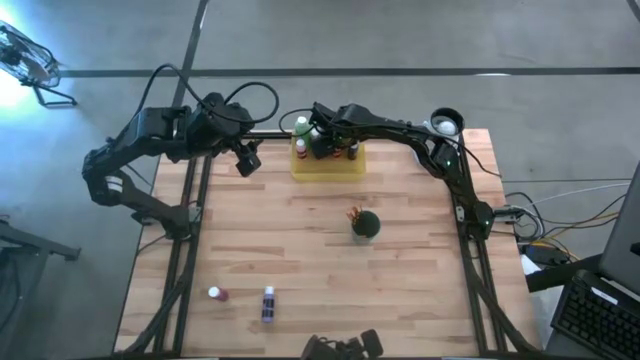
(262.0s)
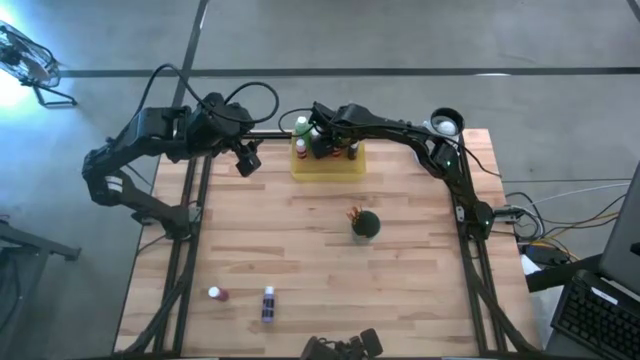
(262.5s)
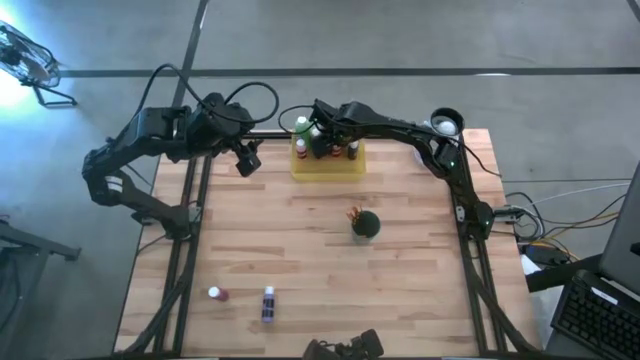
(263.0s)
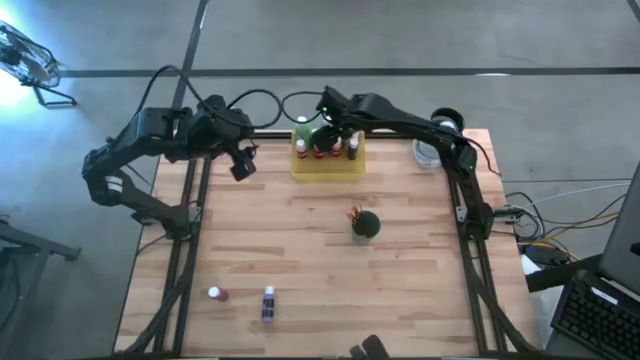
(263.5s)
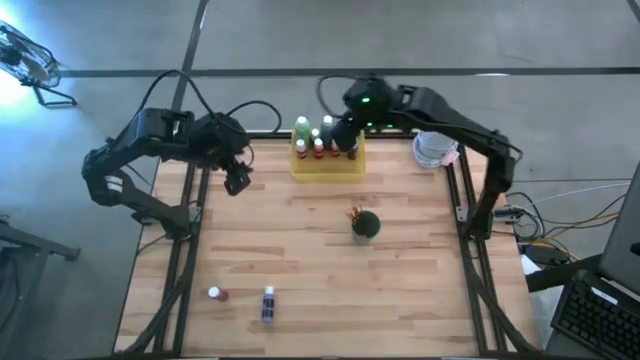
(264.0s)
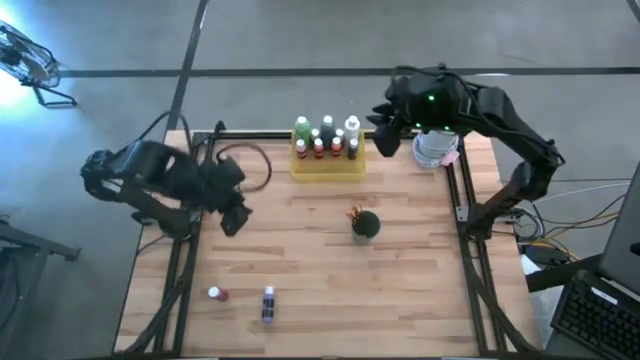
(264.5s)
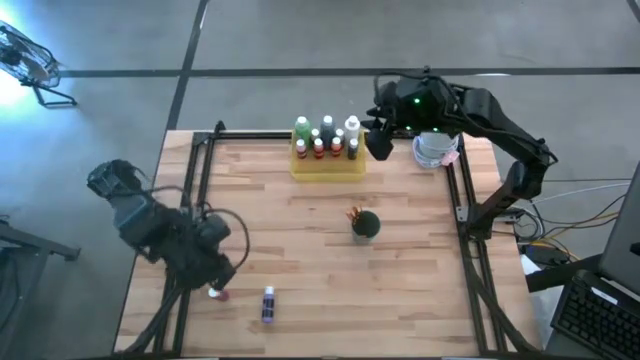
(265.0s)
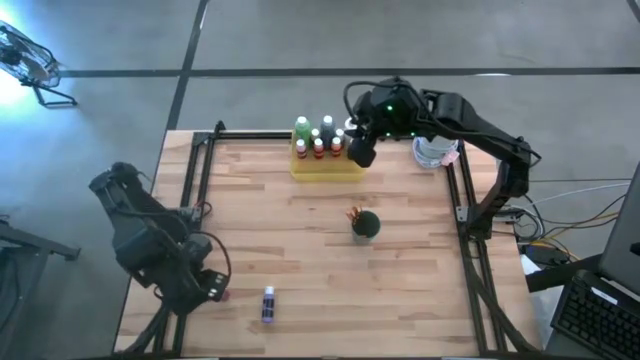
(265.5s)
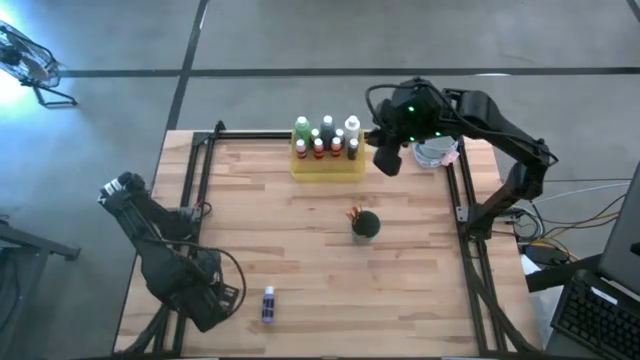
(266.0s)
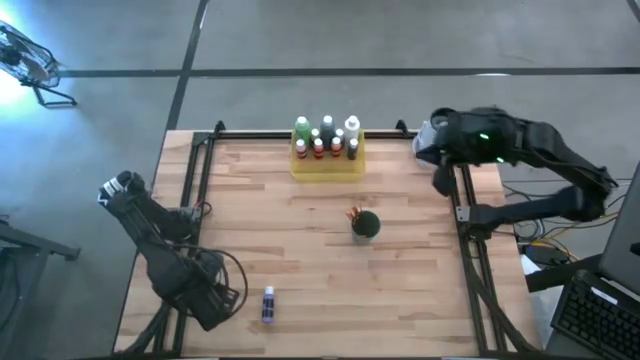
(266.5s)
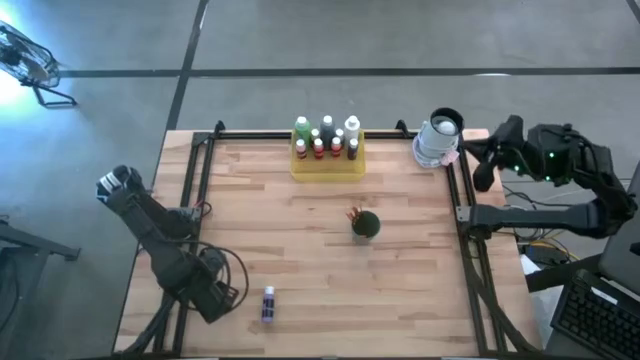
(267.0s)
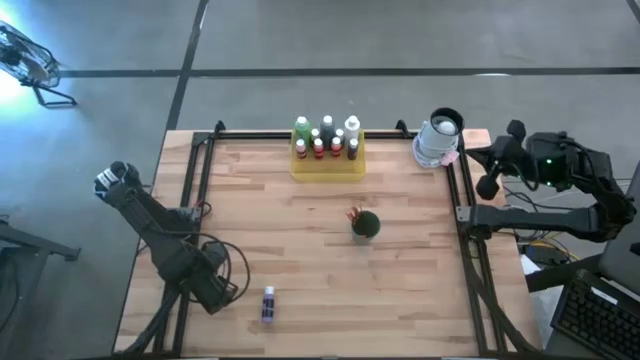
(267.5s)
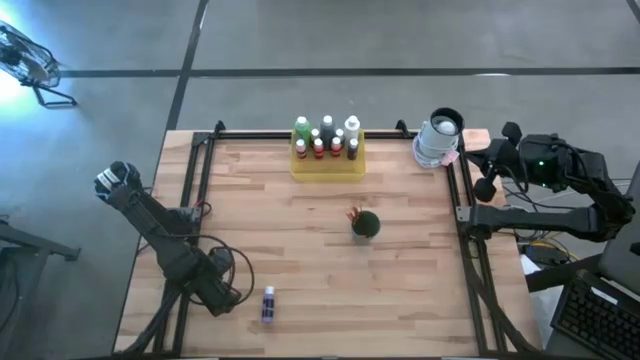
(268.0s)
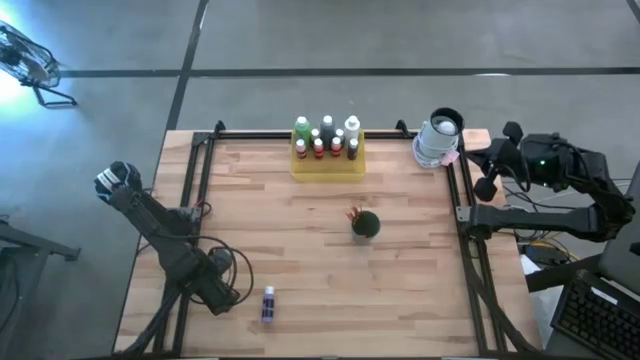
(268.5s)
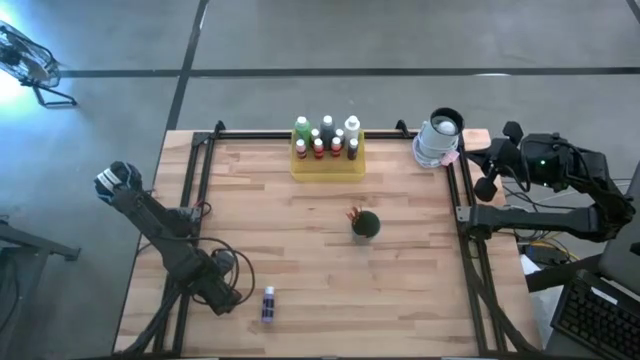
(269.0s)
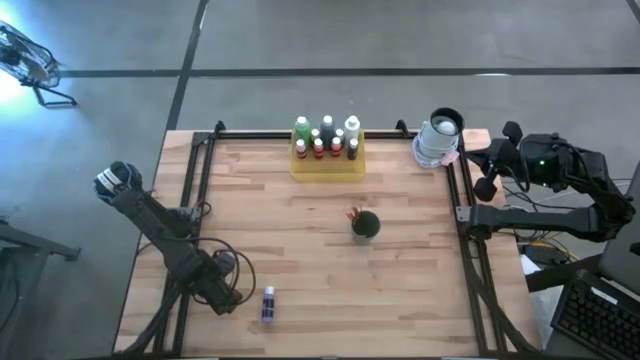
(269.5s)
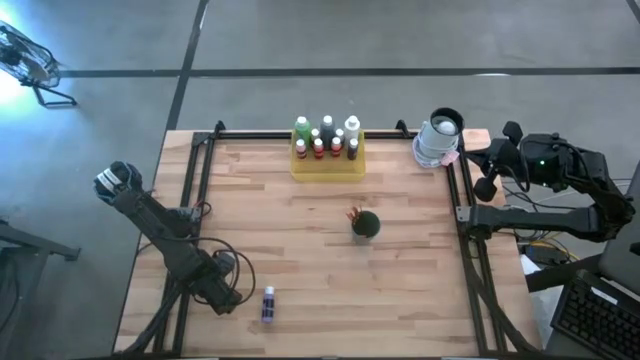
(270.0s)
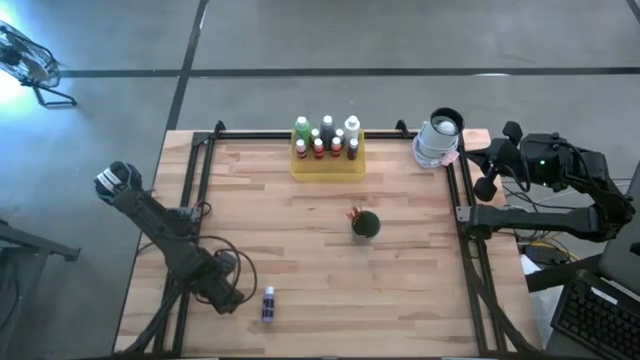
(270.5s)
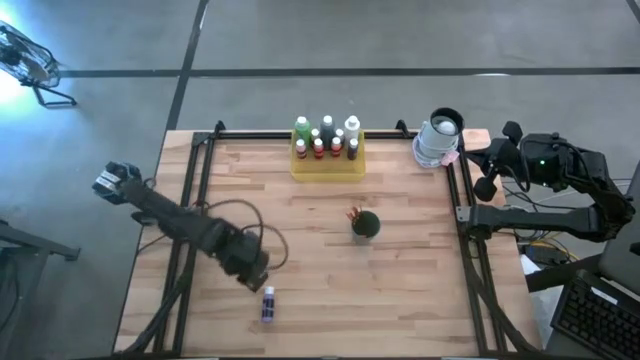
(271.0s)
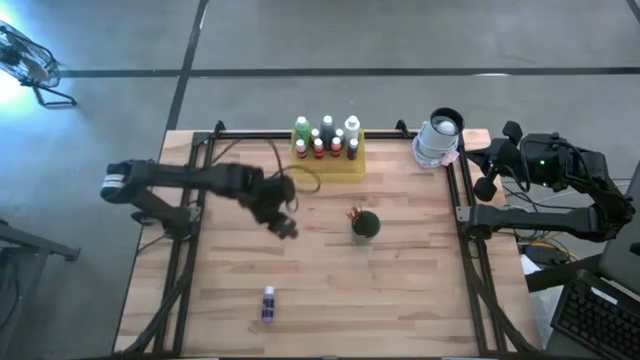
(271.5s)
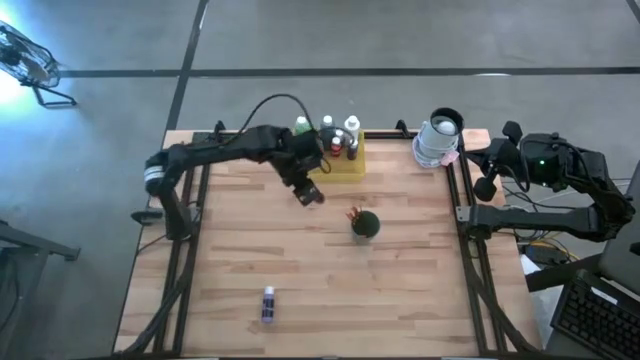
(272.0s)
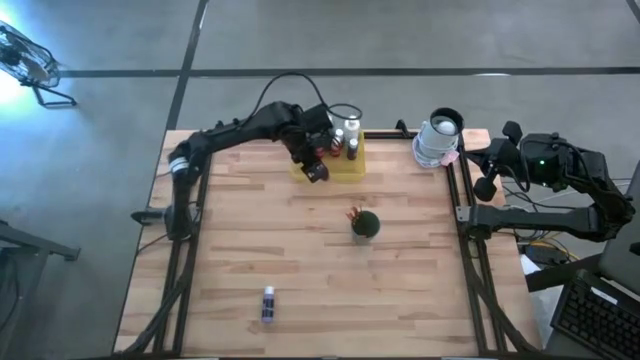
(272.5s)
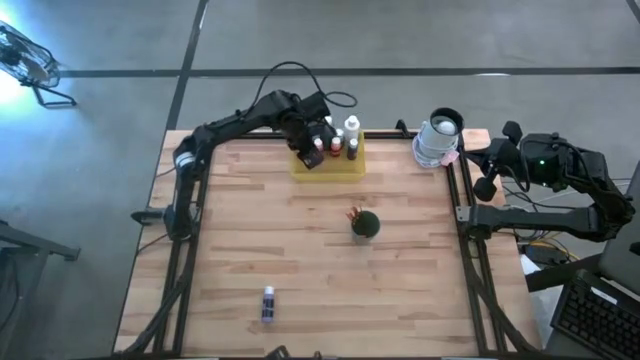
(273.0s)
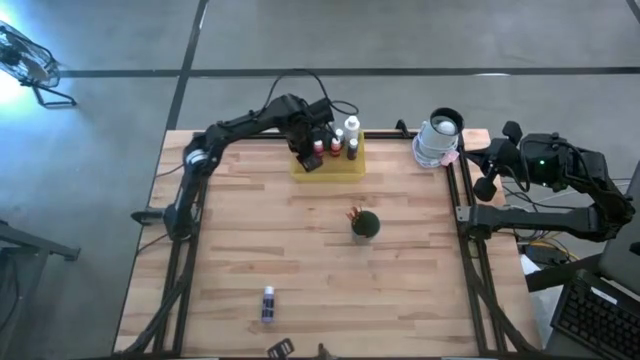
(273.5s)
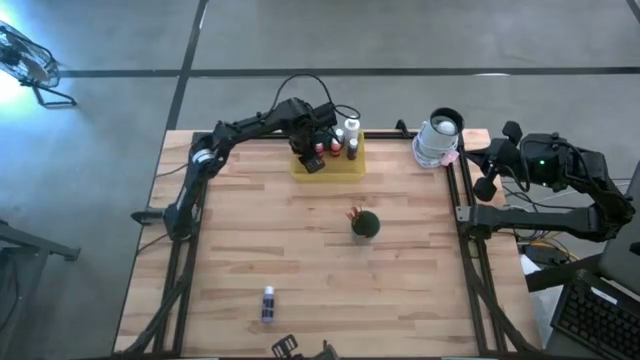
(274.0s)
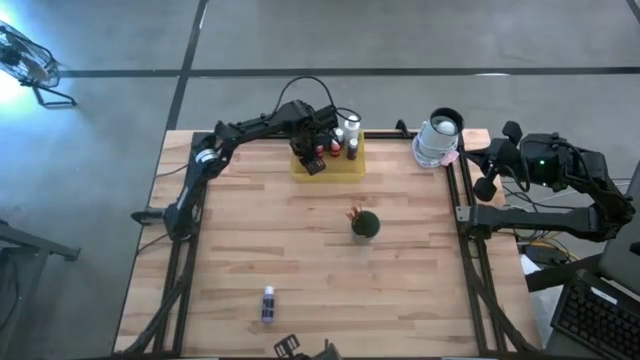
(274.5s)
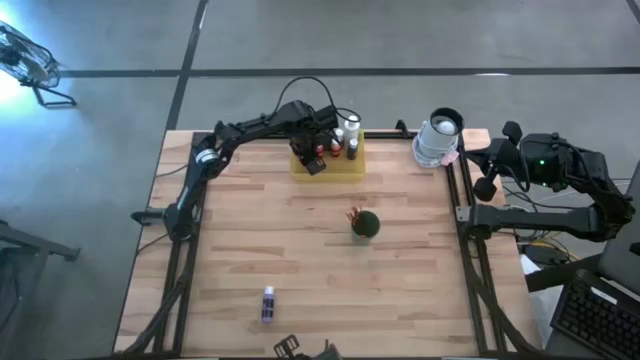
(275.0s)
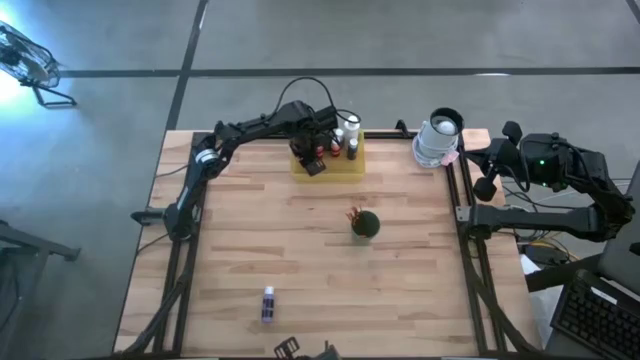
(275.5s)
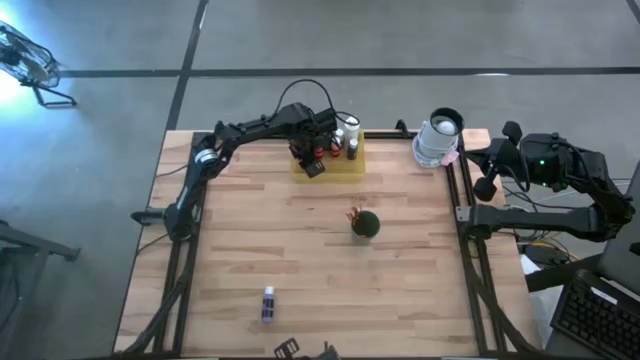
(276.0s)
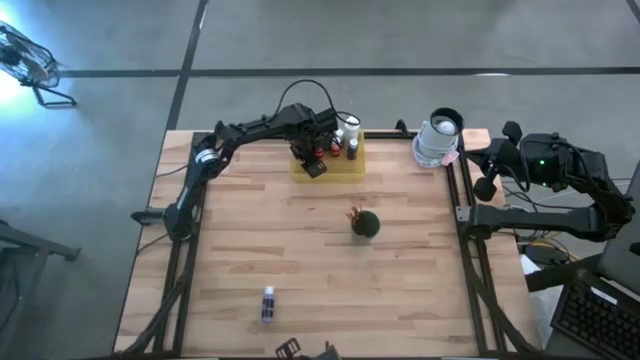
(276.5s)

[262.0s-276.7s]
Task: Pick & Place Paint Supplies
Put the dark pink paint bottle into the yellow bin

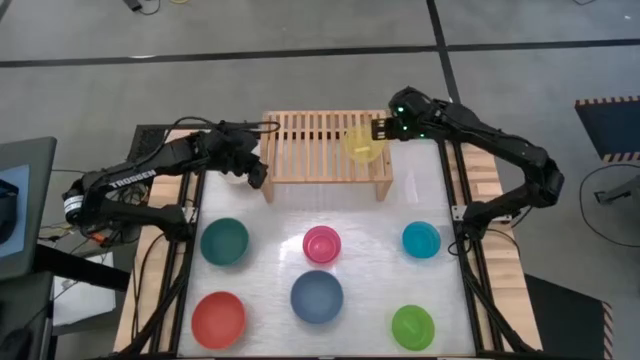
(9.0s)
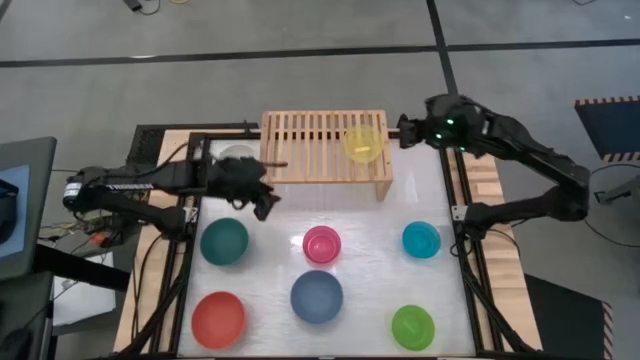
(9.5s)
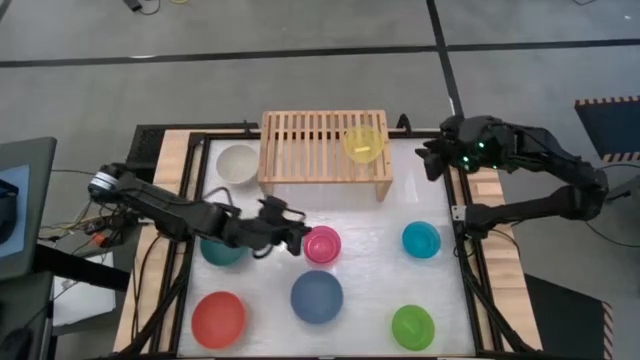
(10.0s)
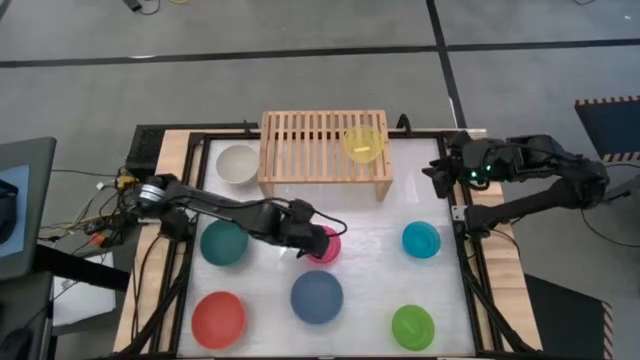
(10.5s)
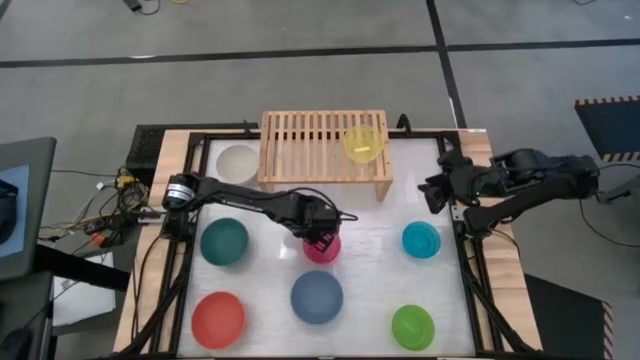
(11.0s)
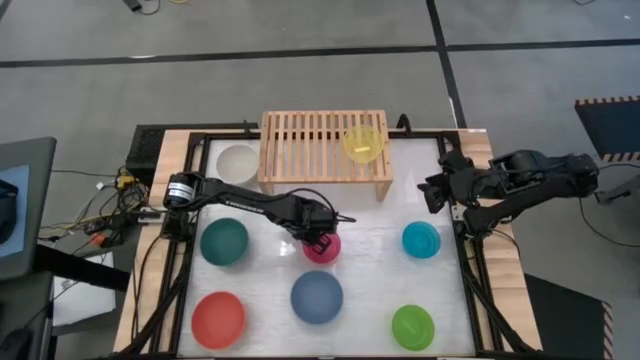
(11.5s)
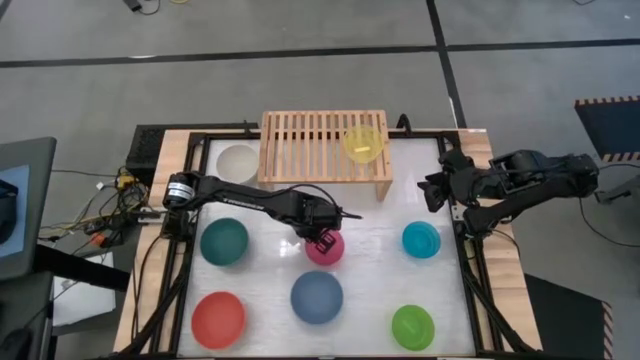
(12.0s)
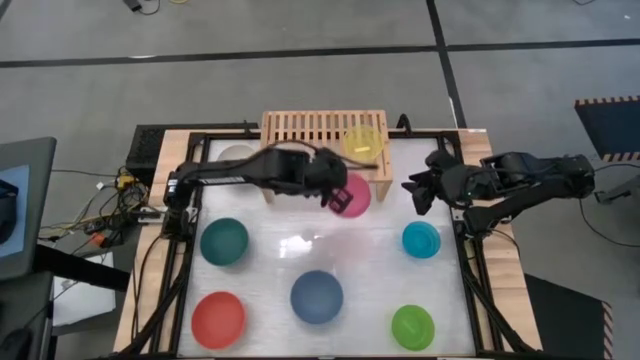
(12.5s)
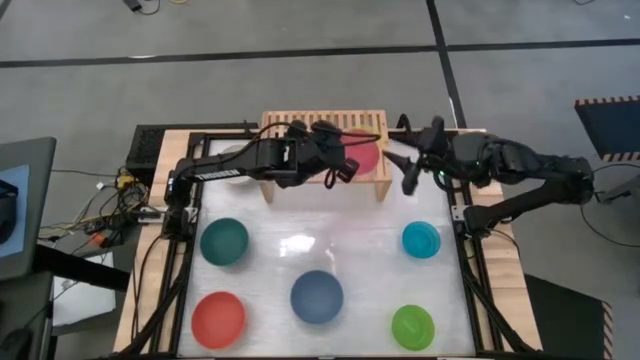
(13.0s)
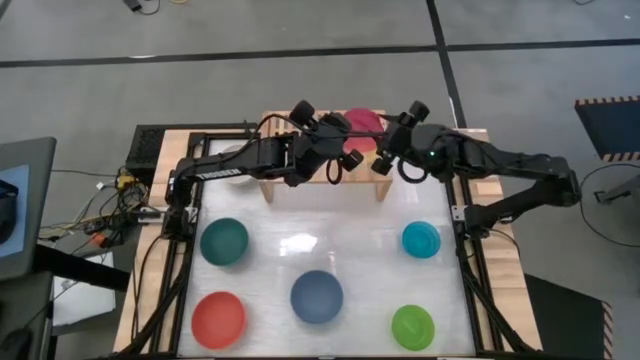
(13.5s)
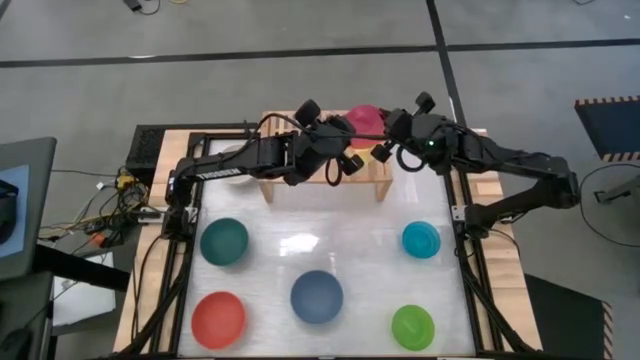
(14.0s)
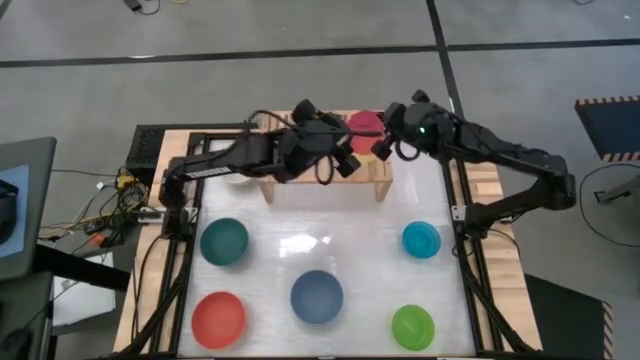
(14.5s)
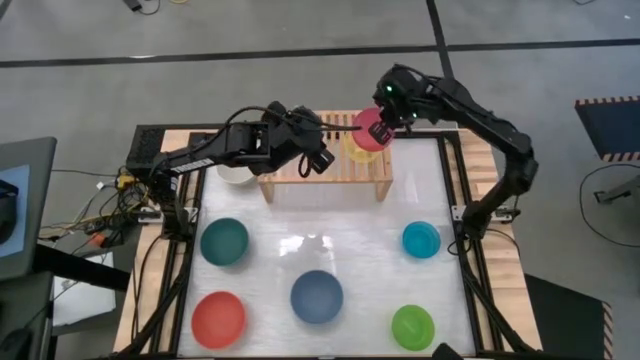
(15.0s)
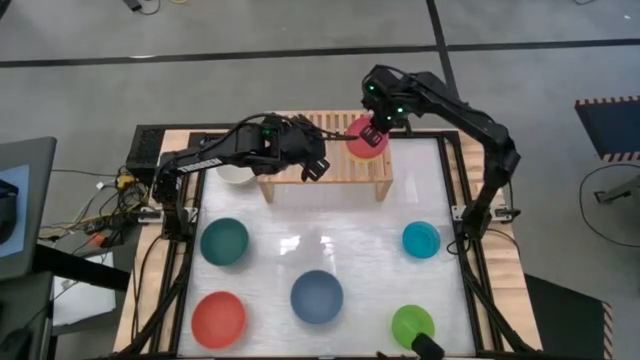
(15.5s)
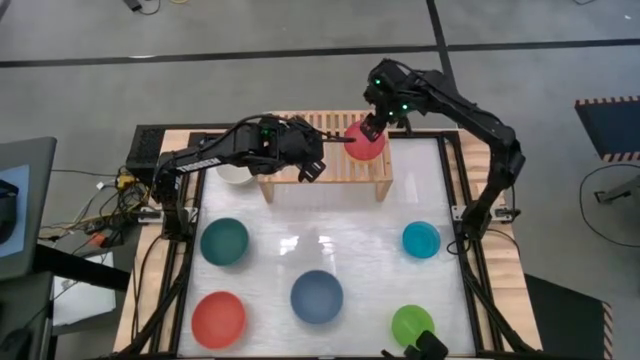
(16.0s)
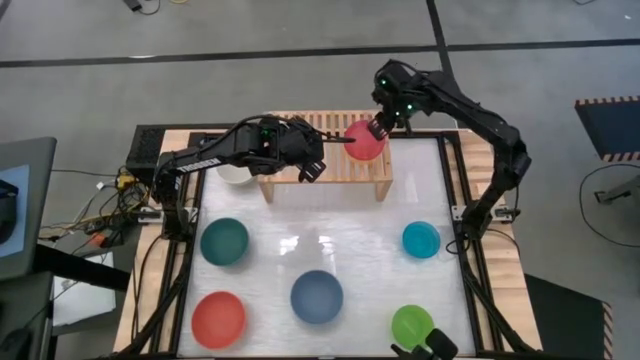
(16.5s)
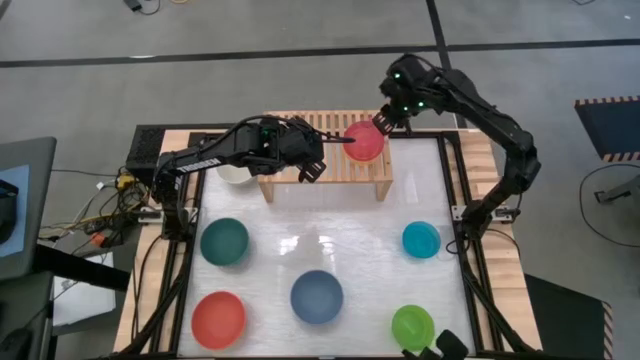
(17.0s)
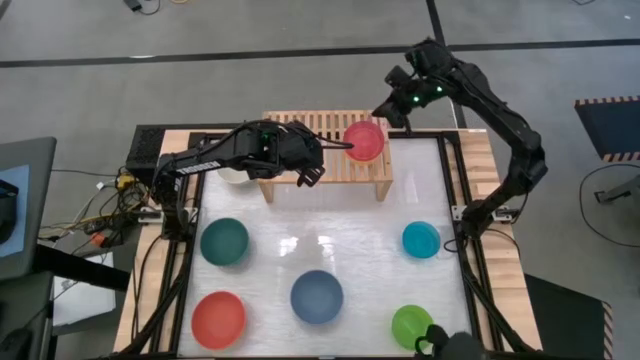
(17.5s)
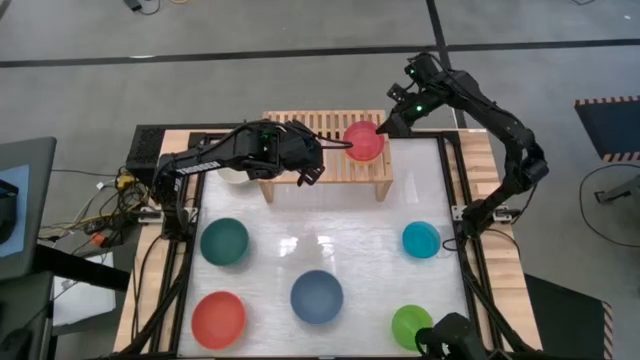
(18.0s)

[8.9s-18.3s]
Task: Place and stack bowls onto a shelf
Stack the small pink bowl on the small yellow bowl on the shelf
